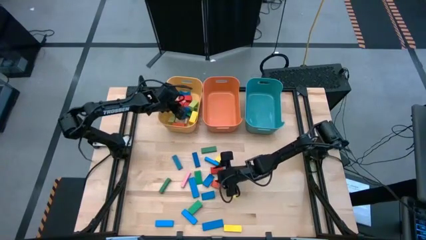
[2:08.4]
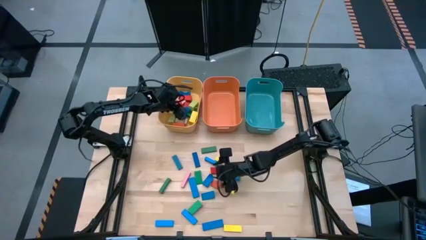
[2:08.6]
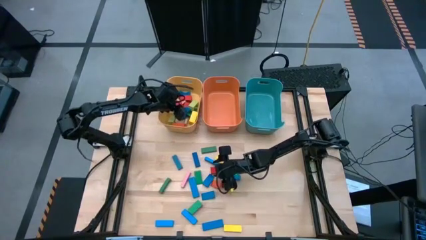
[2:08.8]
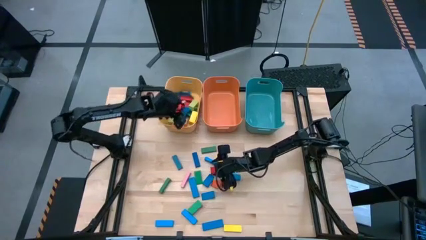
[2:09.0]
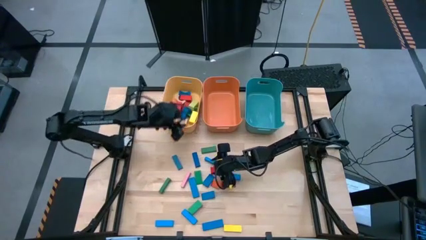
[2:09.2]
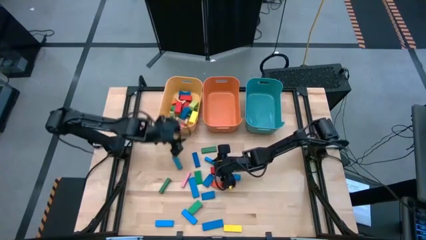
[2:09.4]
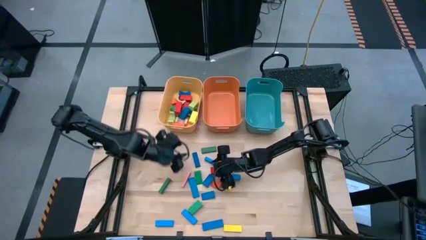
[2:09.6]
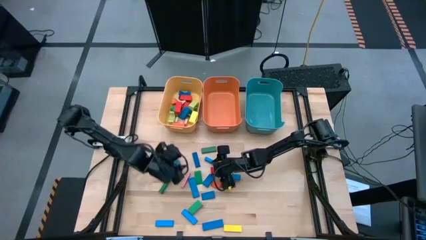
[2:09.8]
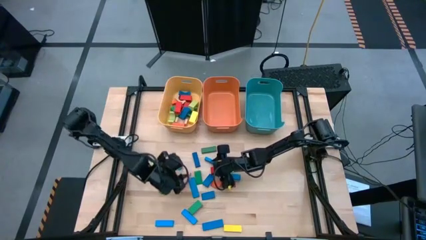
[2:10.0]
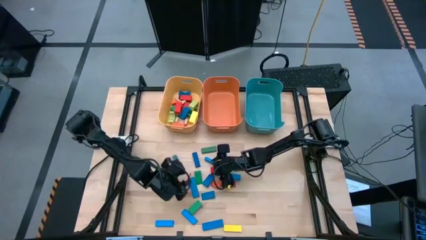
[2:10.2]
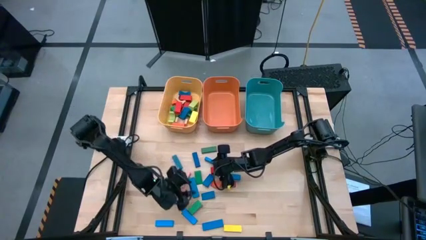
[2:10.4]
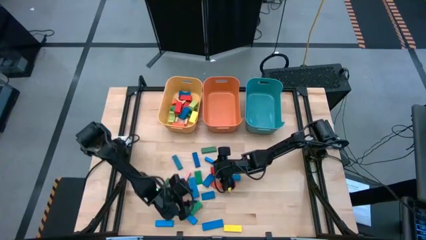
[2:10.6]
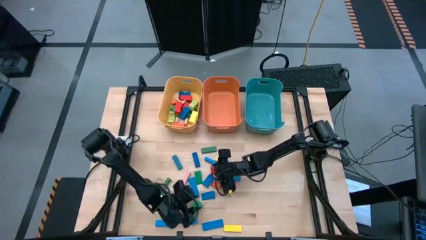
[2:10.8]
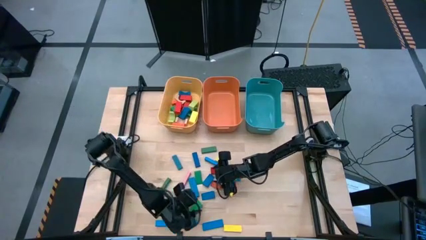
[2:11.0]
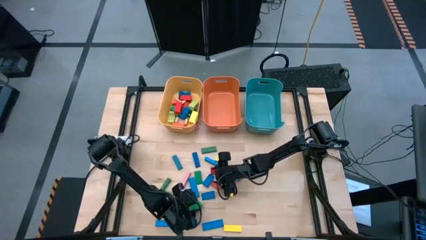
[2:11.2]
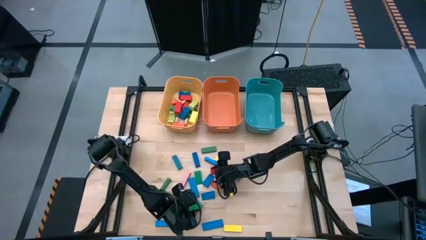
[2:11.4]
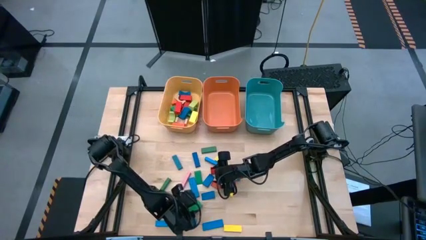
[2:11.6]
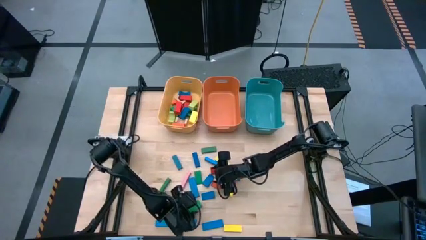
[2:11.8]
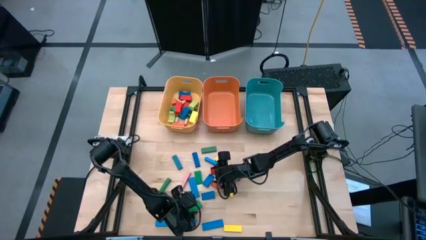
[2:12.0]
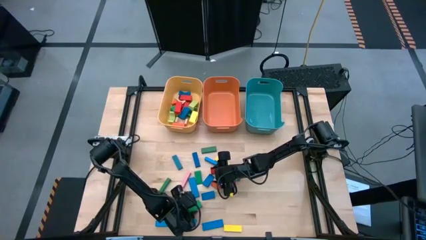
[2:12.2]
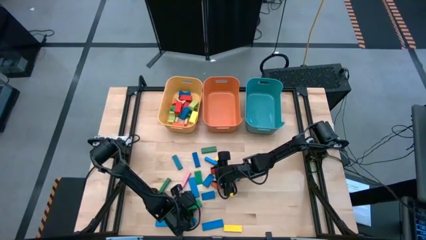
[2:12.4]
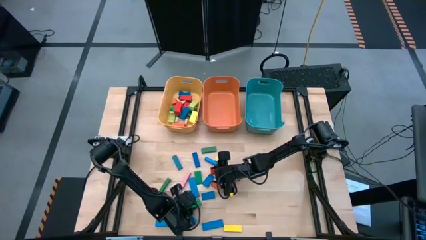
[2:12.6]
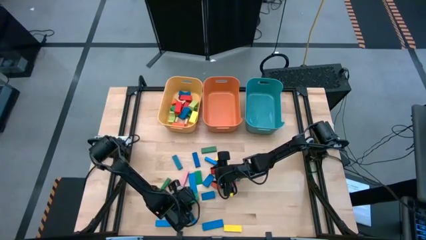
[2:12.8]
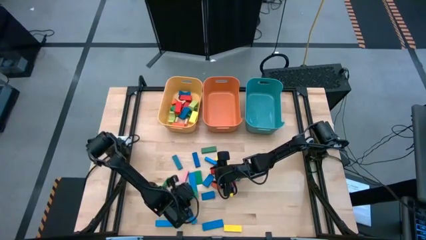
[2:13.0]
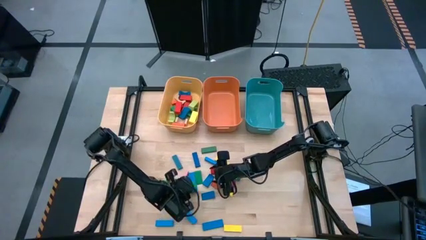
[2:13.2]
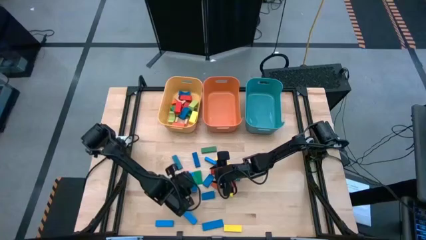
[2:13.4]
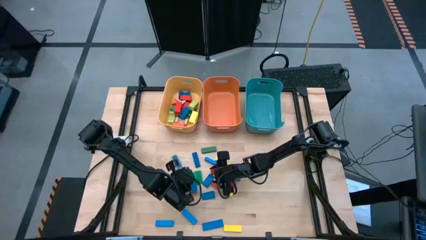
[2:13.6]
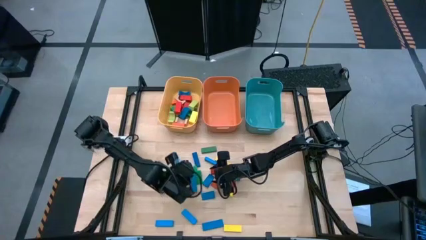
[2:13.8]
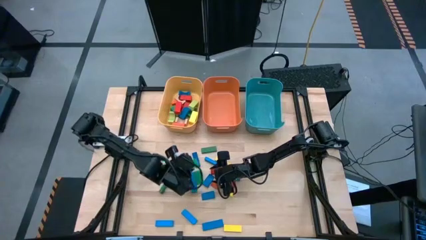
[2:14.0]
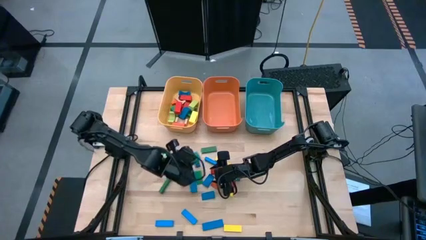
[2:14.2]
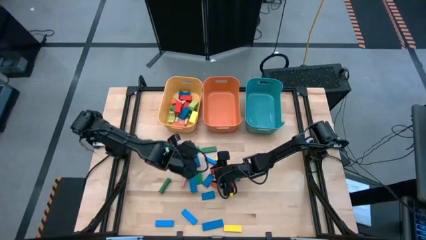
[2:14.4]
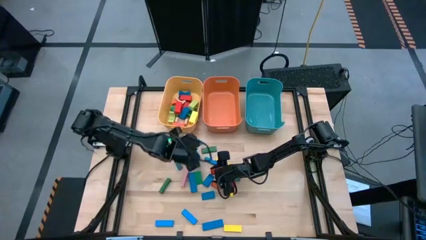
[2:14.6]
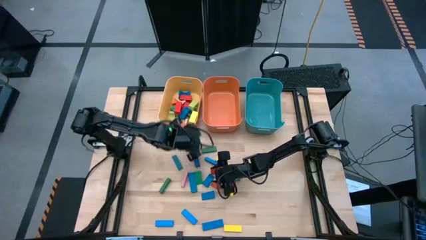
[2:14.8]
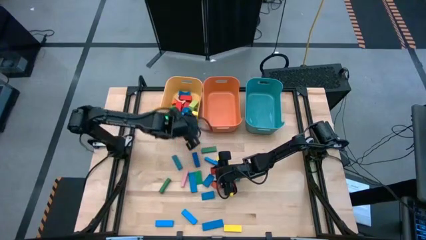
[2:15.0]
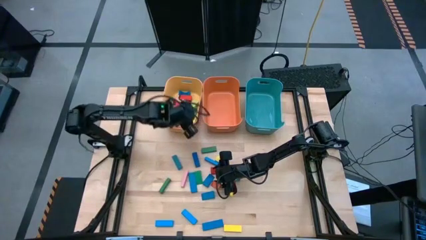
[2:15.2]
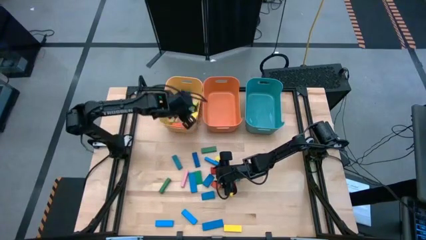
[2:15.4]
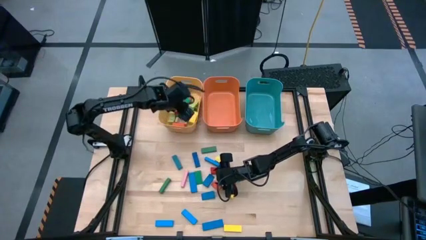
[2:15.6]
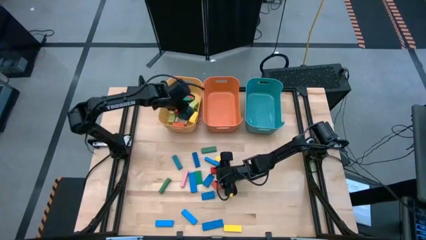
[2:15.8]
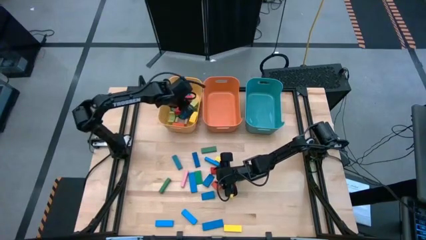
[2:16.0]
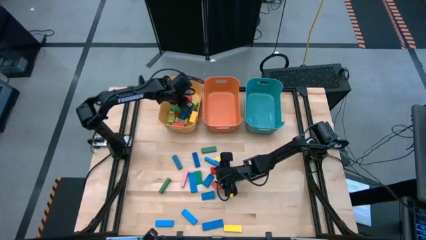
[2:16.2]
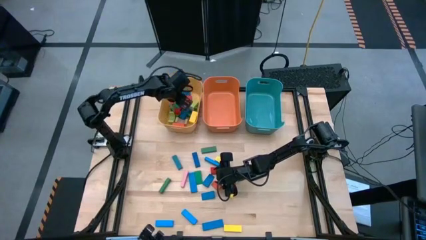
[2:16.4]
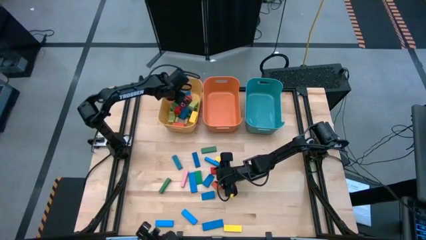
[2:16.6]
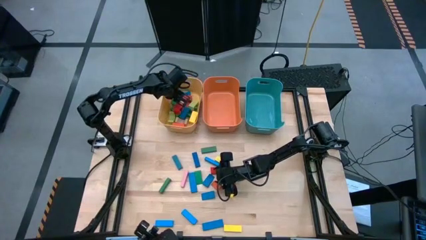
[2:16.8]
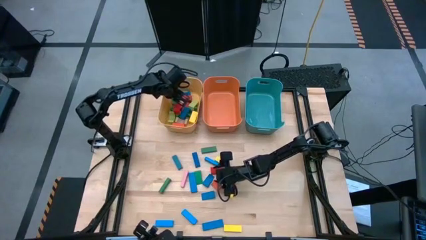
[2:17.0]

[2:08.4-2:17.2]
Task: Sort blocks by size
Put the green arch block into the yellow bin

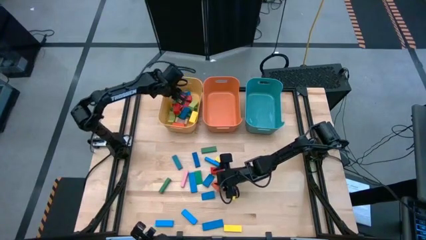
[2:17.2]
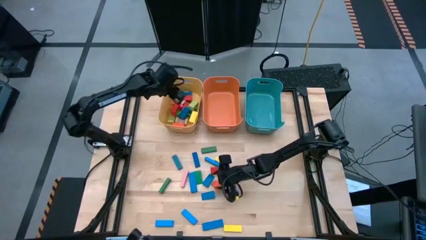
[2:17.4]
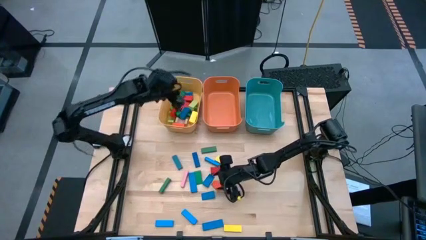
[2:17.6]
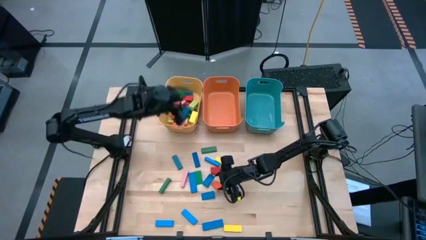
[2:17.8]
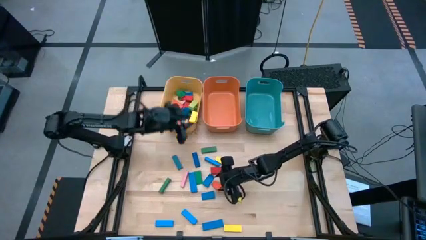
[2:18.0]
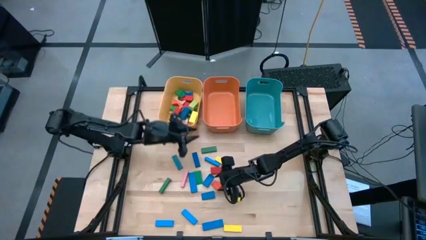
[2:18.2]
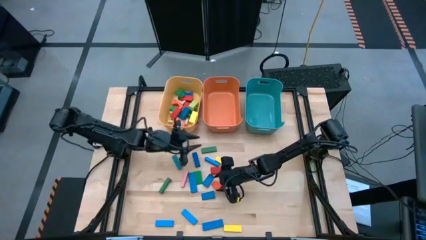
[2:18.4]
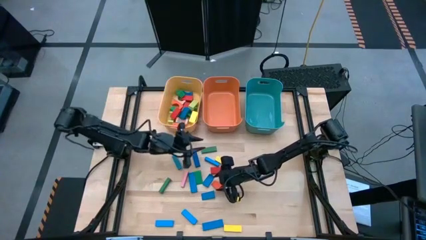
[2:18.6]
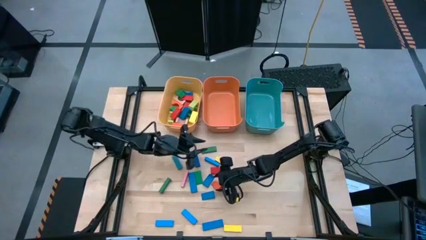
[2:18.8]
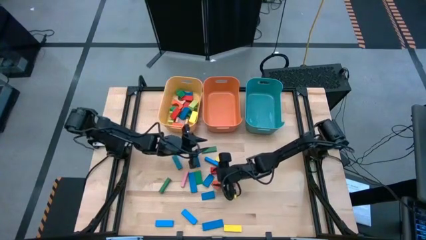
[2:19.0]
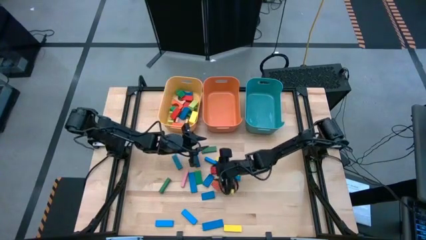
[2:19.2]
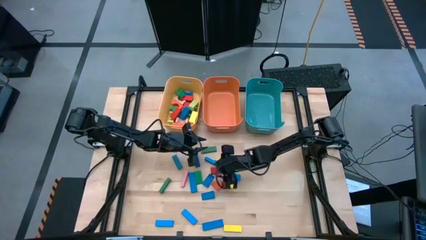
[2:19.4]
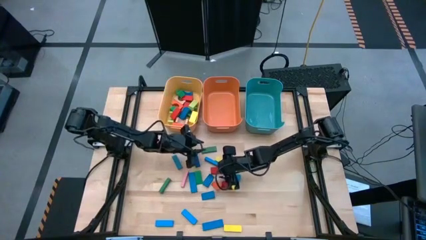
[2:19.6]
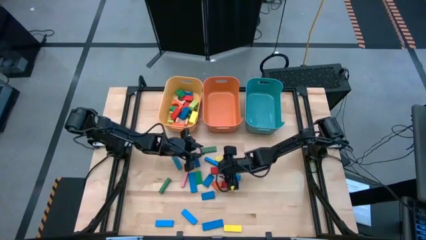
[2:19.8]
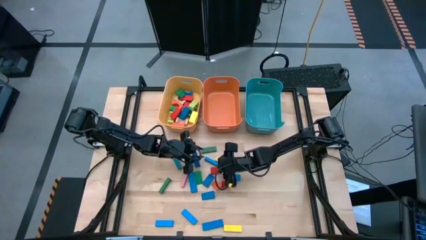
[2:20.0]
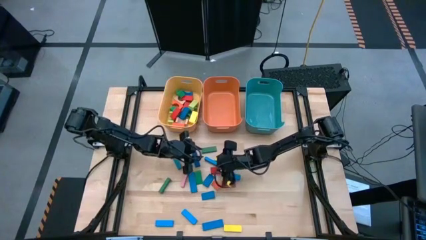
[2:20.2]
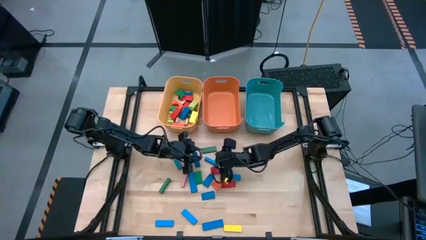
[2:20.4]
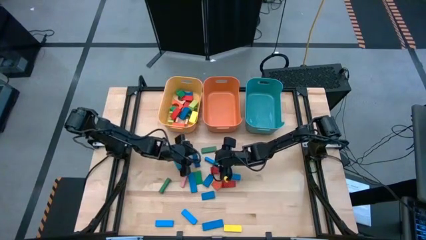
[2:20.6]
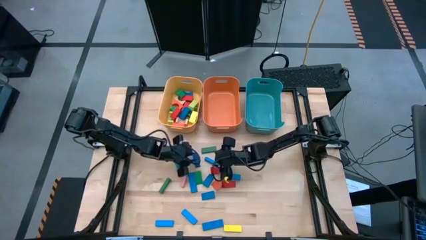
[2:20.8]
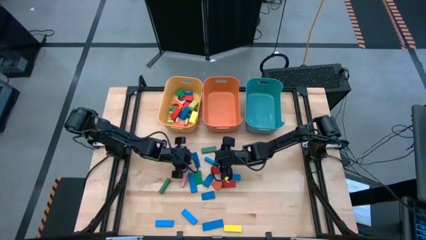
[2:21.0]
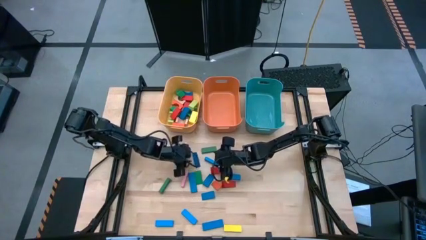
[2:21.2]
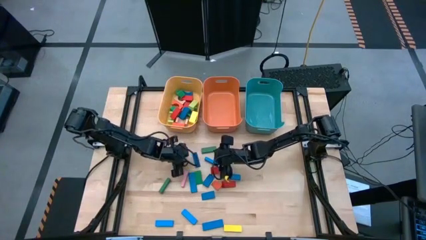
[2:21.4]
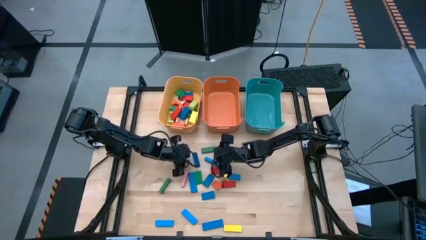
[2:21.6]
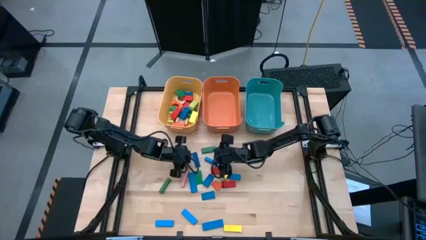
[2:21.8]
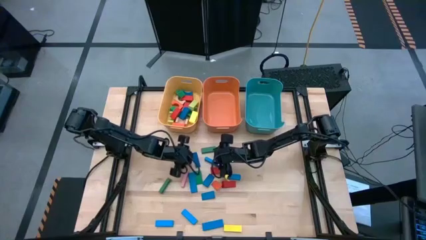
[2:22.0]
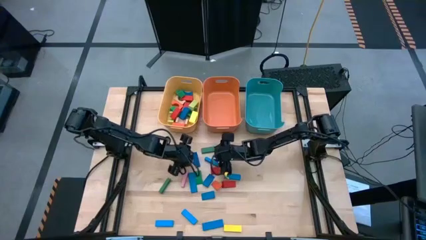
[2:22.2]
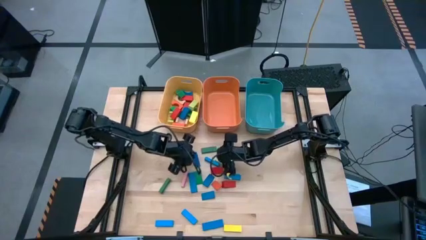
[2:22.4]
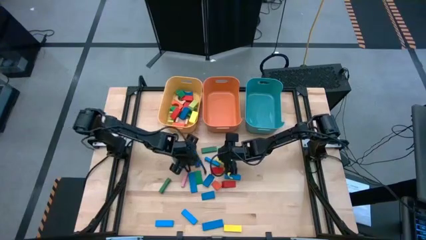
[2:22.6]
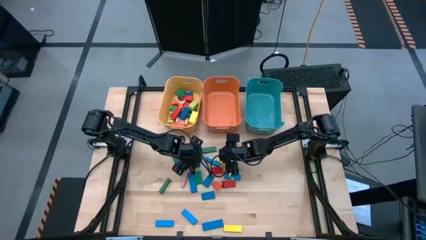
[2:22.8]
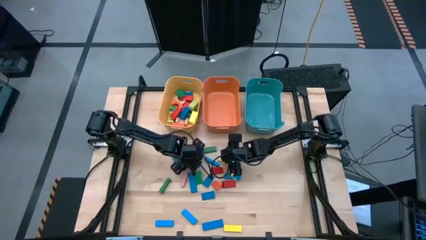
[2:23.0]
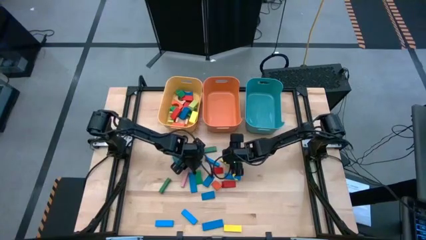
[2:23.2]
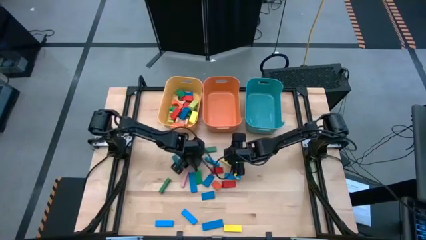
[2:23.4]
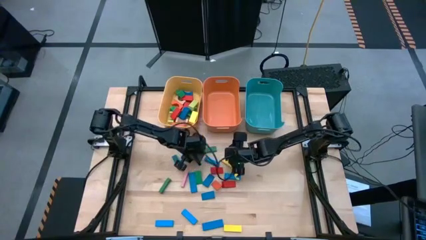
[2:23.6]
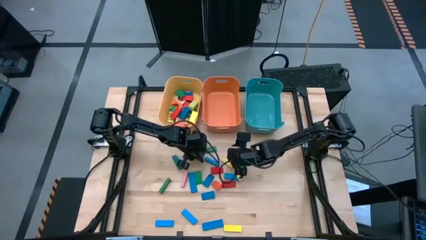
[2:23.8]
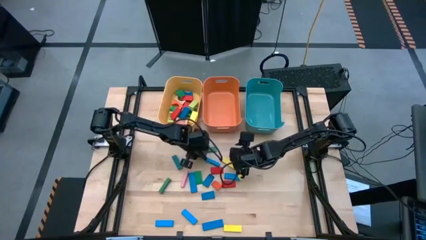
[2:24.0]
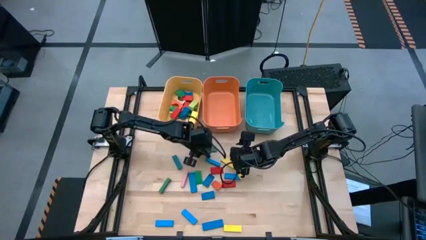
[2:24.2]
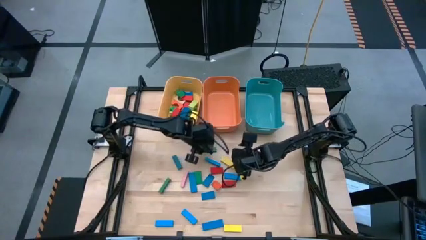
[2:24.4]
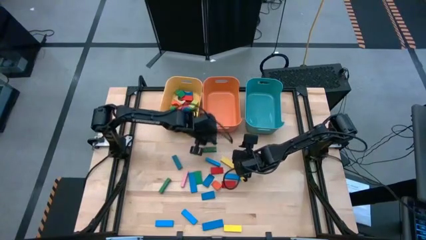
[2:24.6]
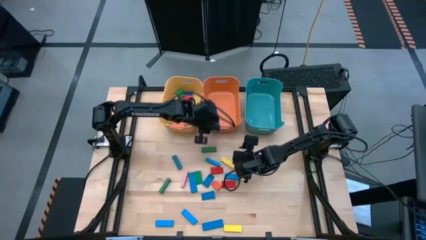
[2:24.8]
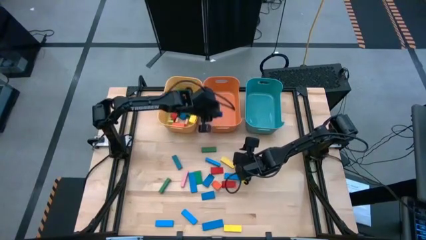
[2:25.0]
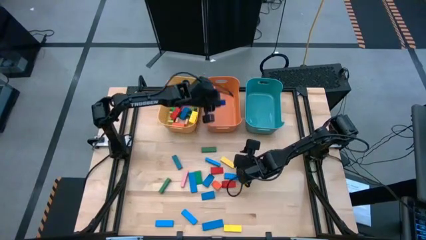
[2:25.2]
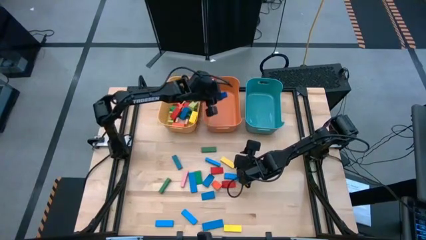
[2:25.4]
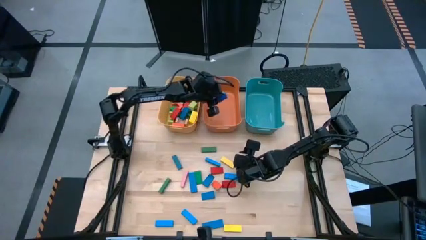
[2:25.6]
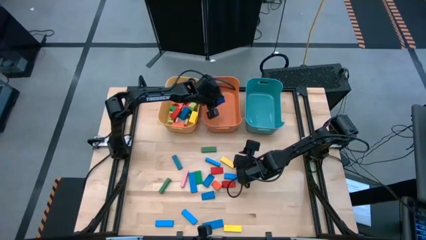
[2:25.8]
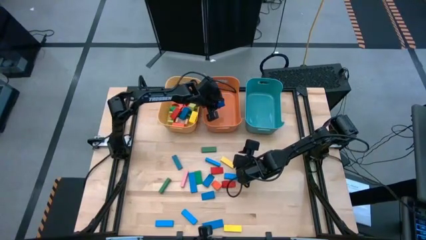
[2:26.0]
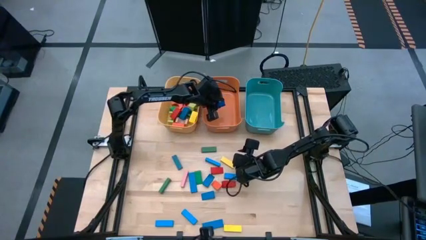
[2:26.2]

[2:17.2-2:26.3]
Put the blue rectangle block into the orange bin
